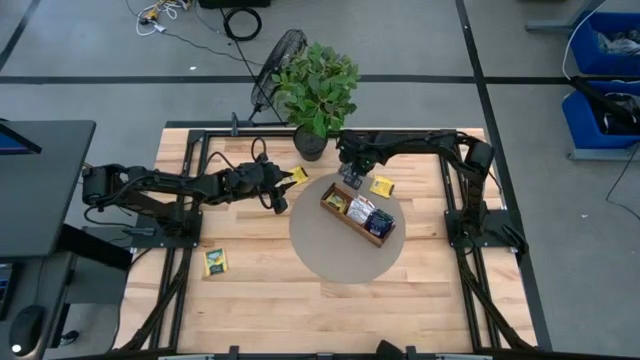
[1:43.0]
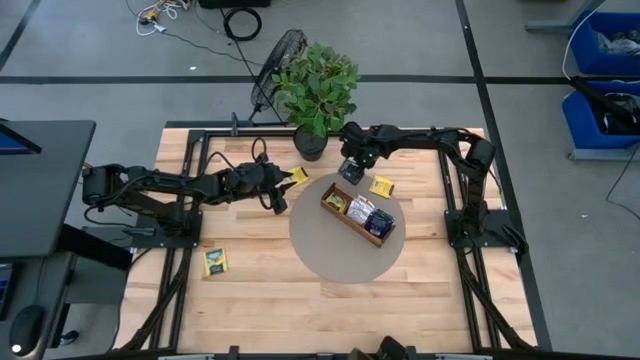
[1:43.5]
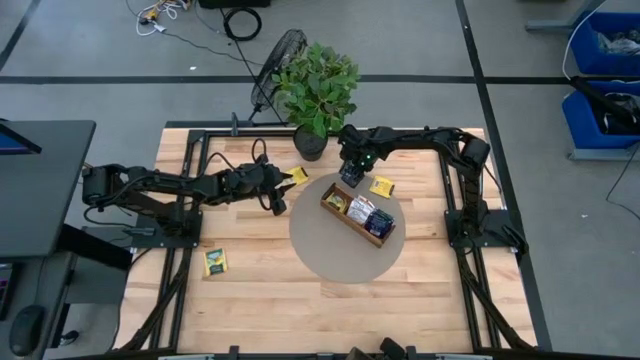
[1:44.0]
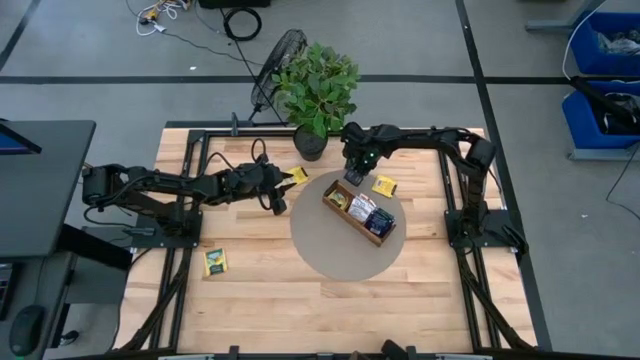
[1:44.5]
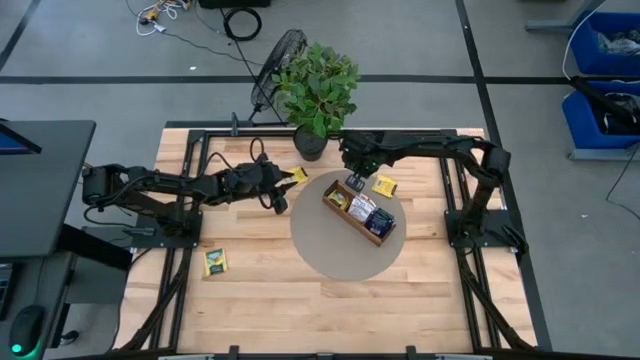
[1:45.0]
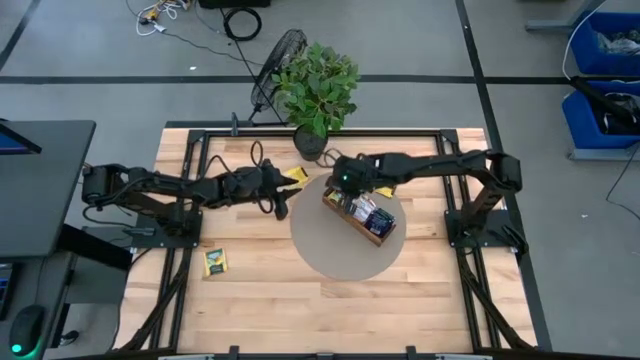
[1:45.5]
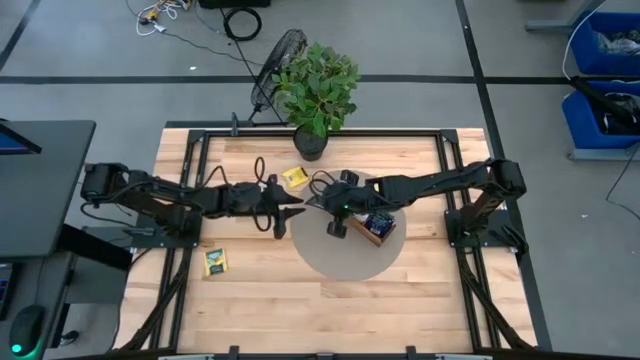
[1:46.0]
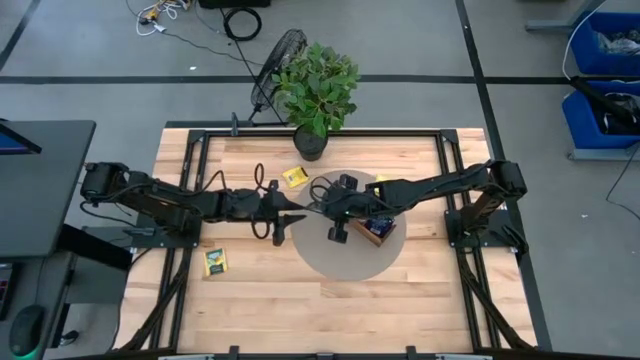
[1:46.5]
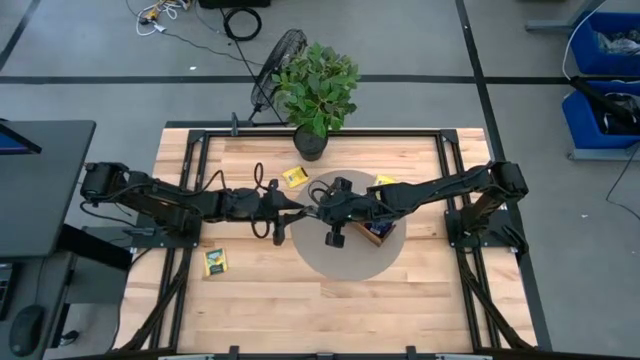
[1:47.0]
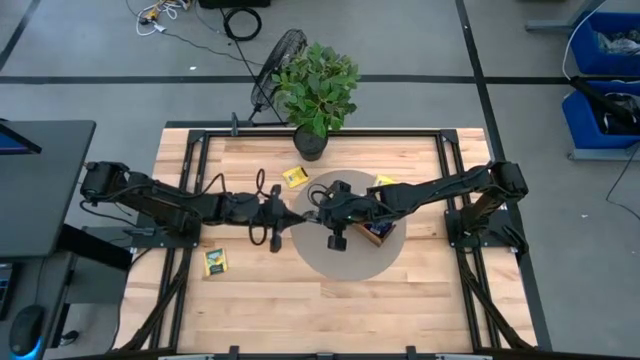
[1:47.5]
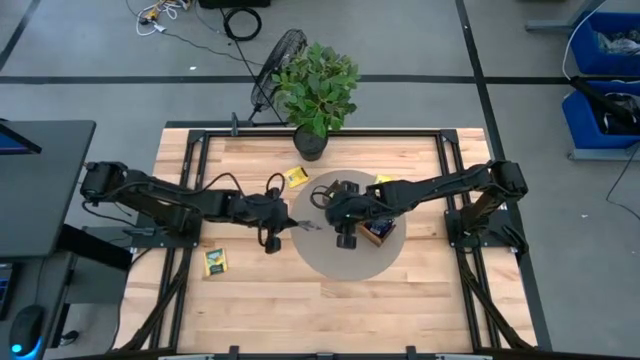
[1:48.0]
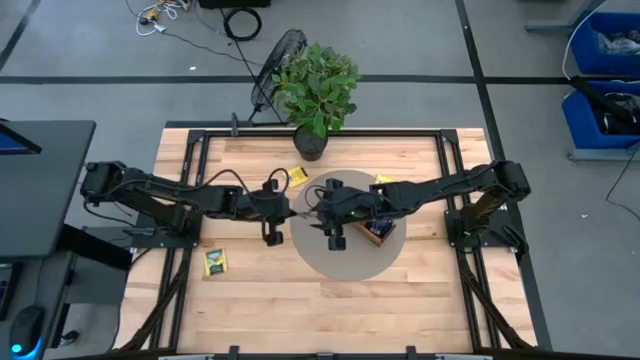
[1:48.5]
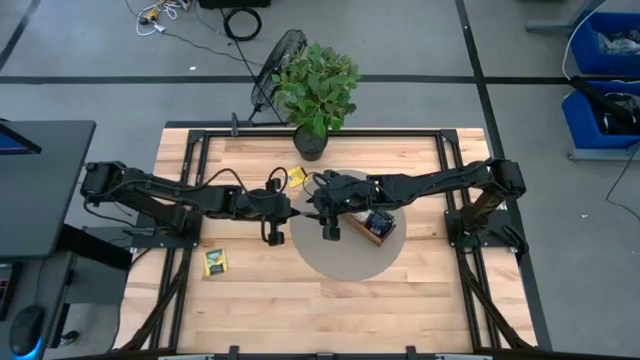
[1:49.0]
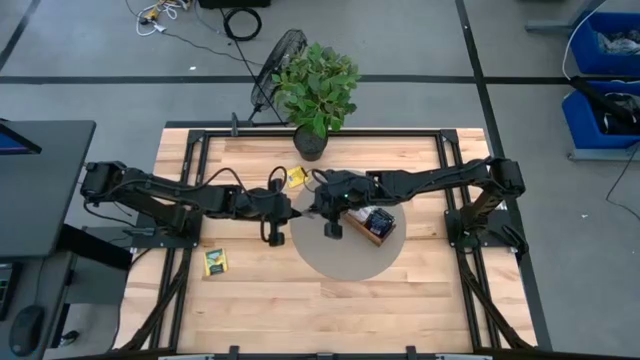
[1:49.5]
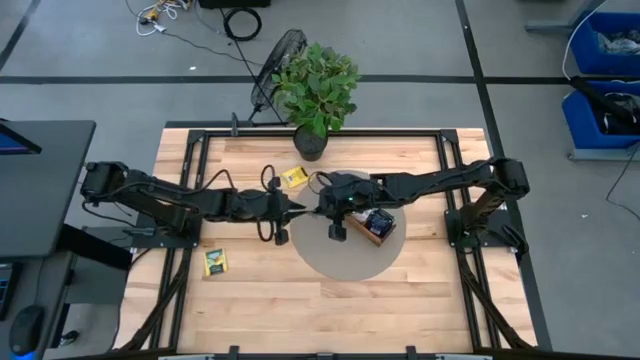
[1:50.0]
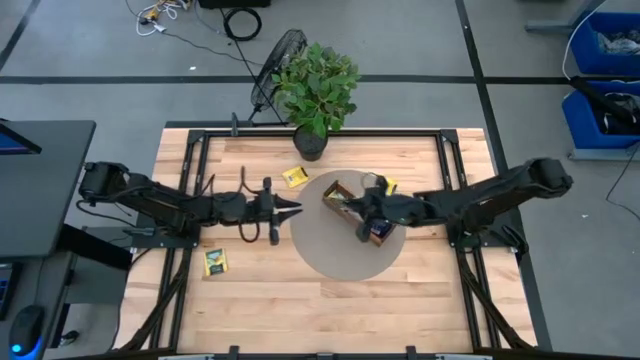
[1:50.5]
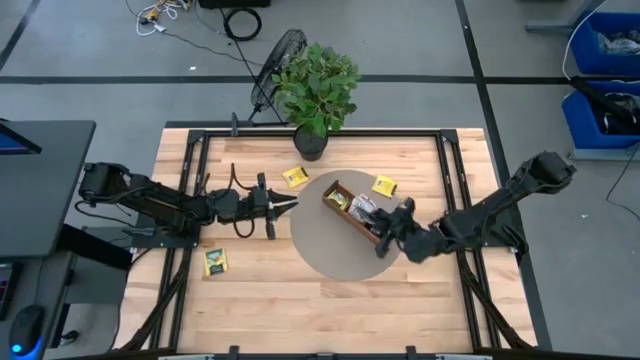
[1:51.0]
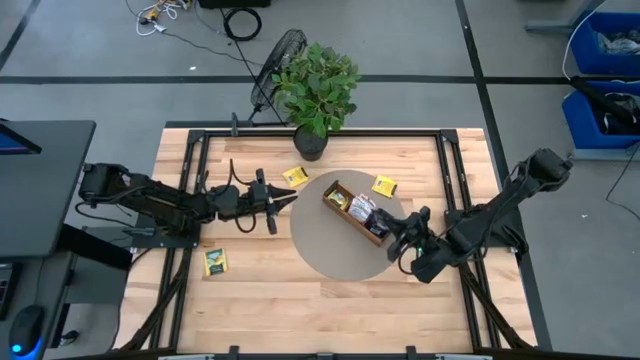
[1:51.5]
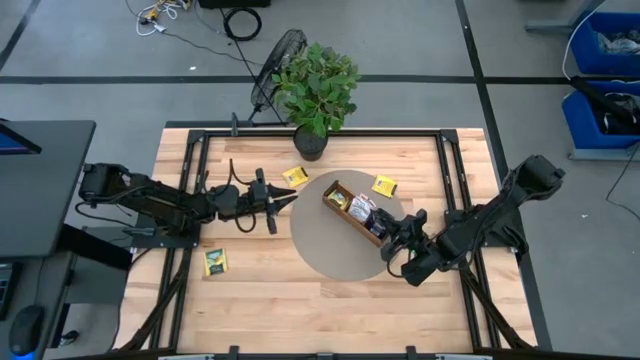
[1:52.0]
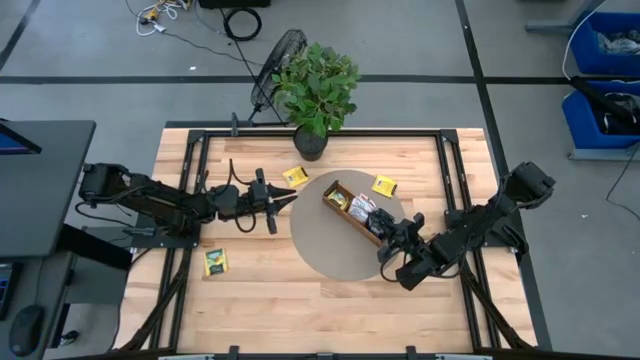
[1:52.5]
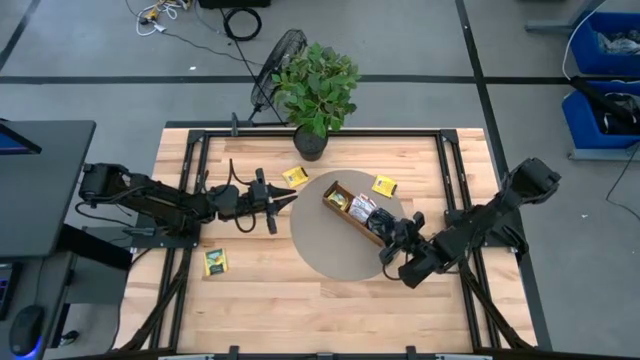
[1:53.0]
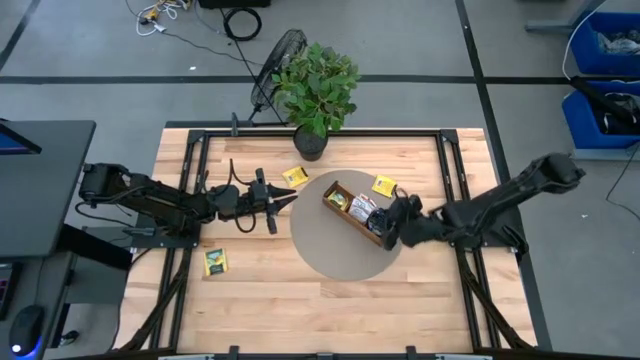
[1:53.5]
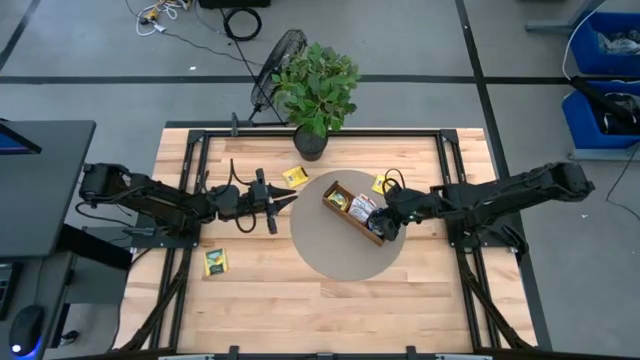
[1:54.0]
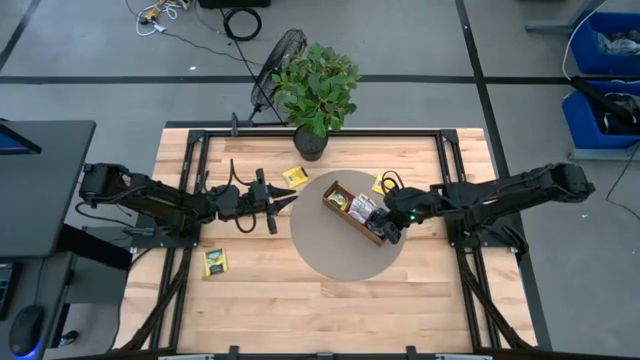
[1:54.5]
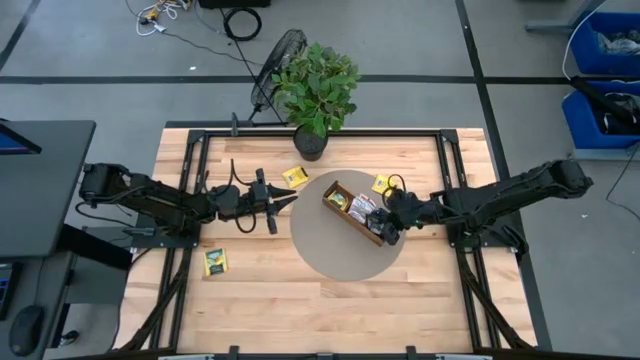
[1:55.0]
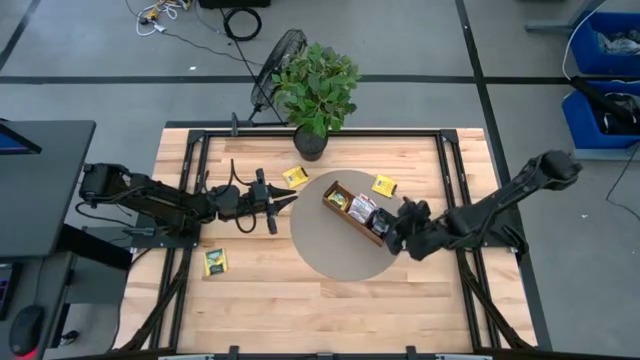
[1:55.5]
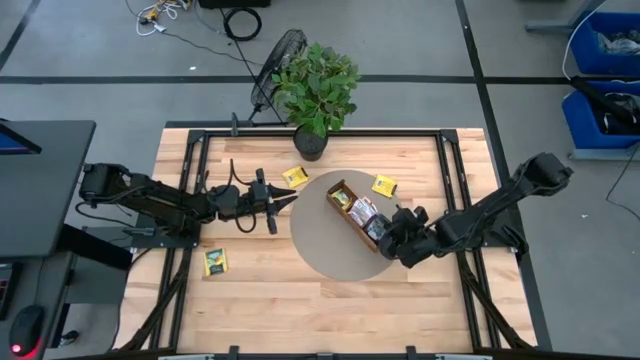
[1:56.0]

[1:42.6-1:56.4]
Task: Pick & Place Tea
Put the black tea bag into the right section of the wooden organizer

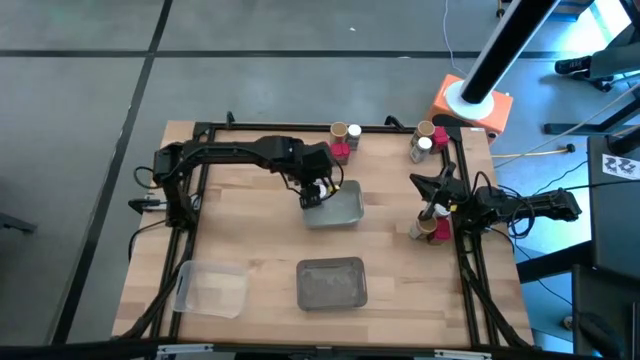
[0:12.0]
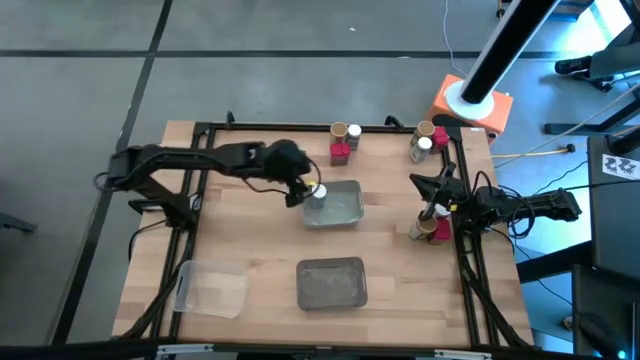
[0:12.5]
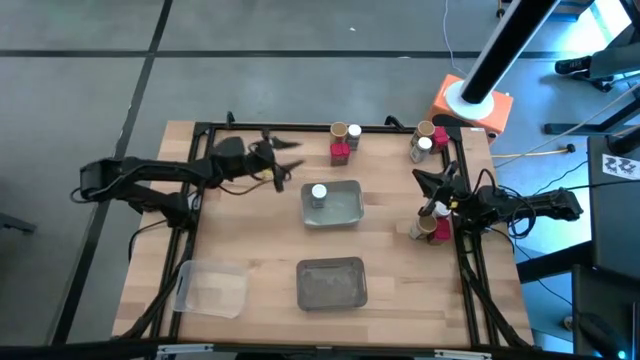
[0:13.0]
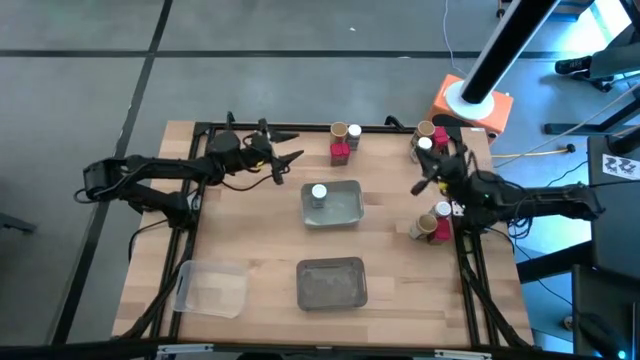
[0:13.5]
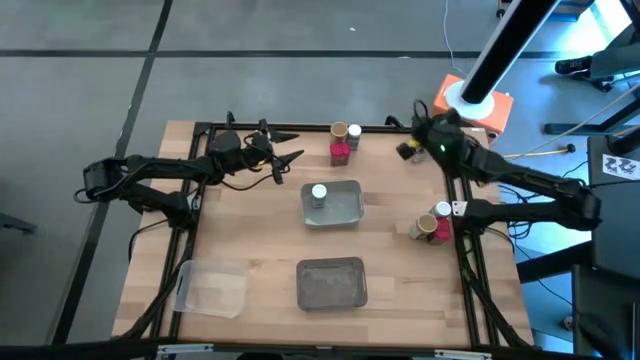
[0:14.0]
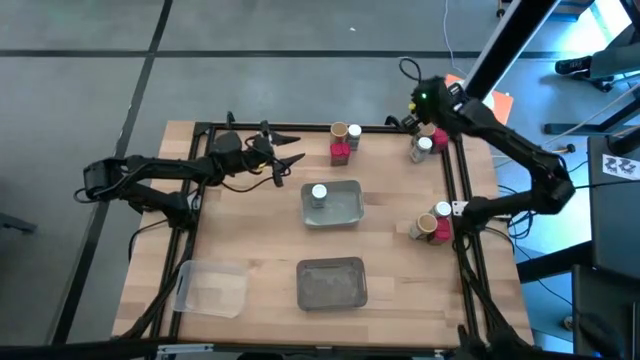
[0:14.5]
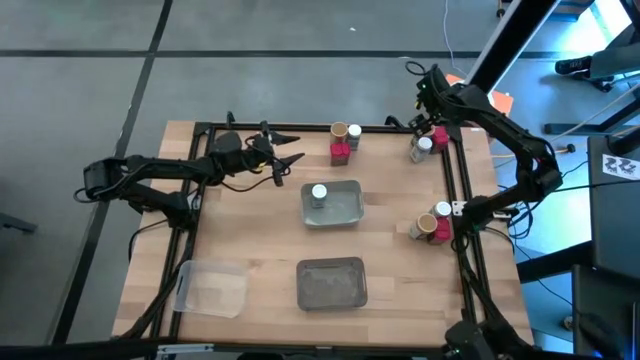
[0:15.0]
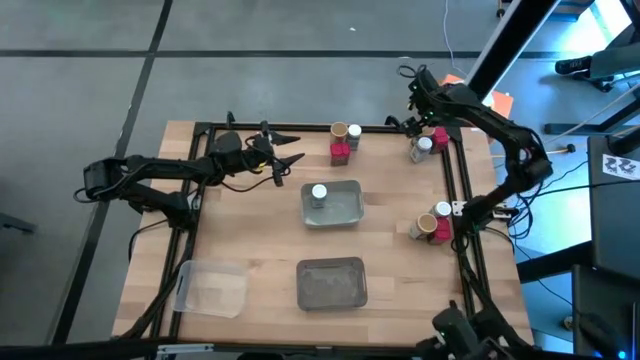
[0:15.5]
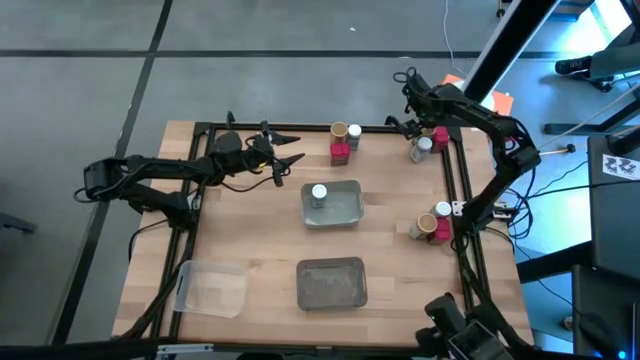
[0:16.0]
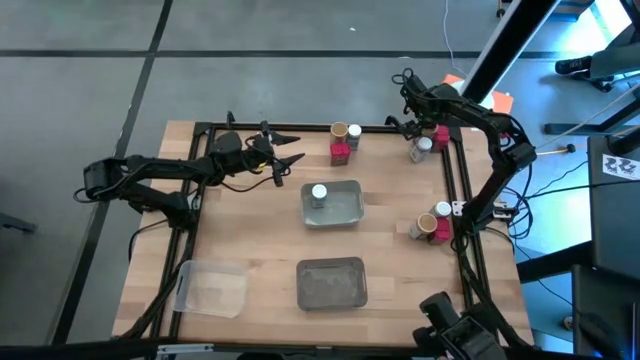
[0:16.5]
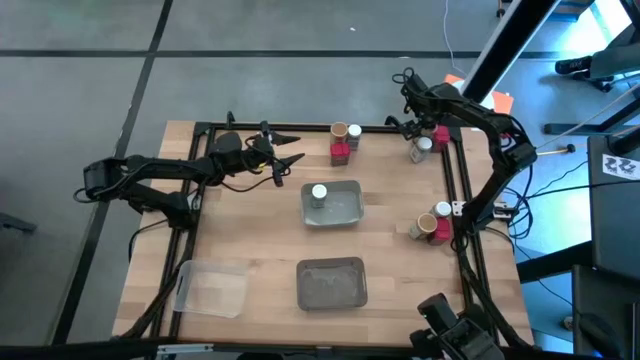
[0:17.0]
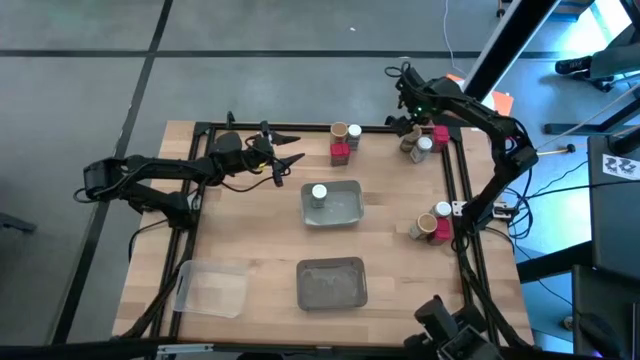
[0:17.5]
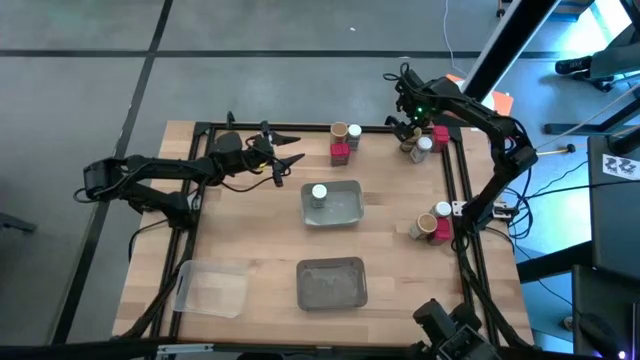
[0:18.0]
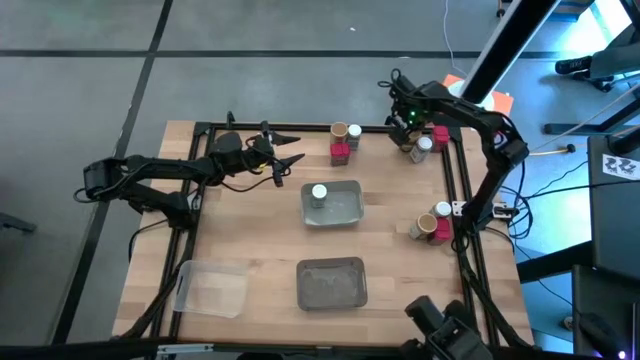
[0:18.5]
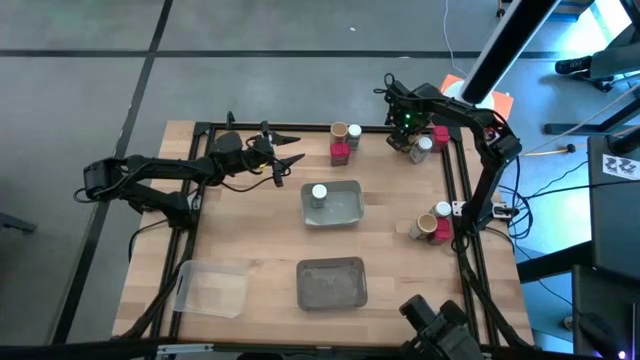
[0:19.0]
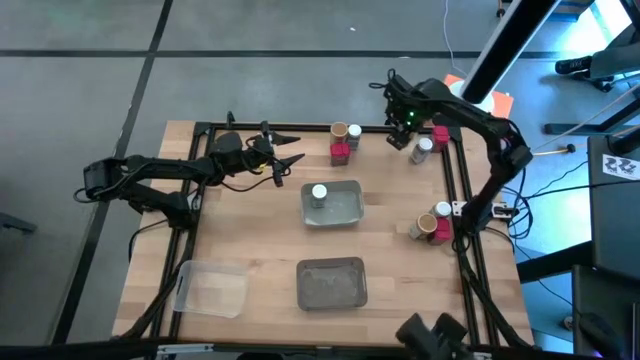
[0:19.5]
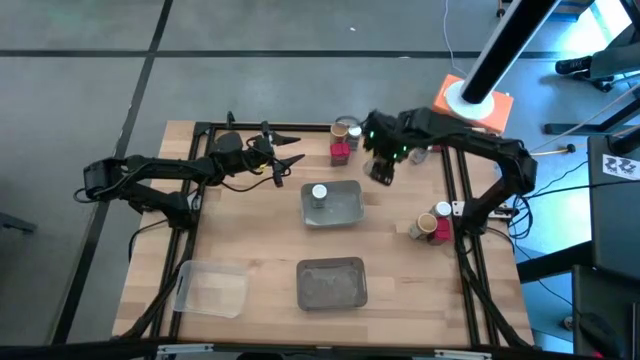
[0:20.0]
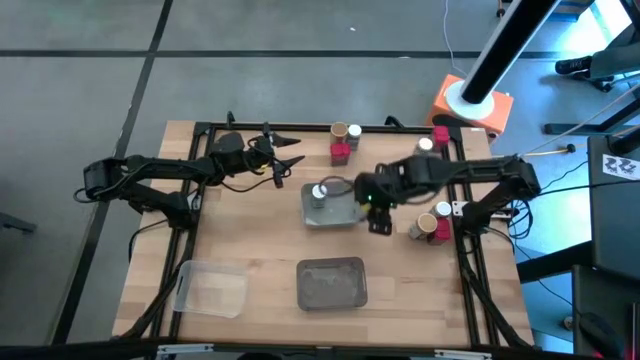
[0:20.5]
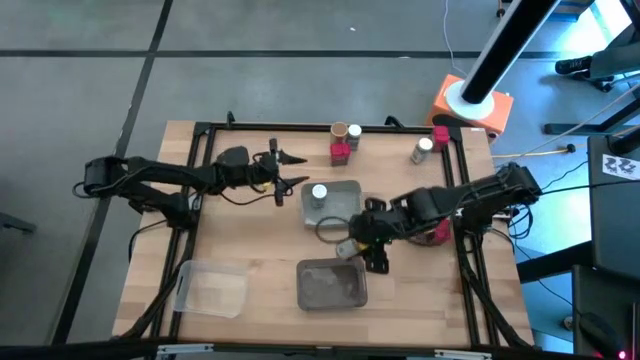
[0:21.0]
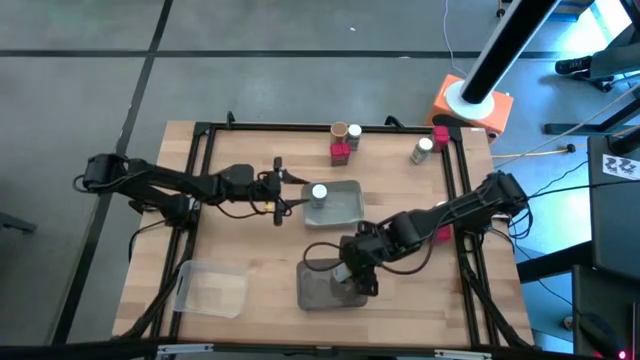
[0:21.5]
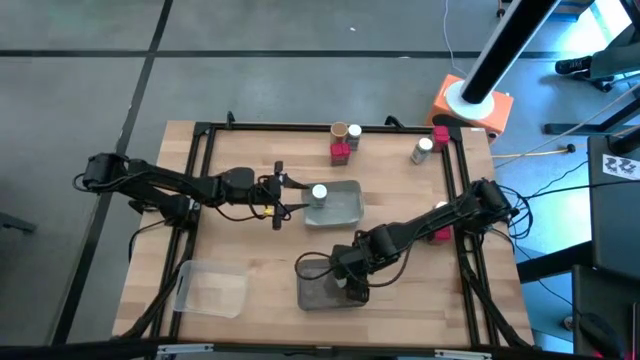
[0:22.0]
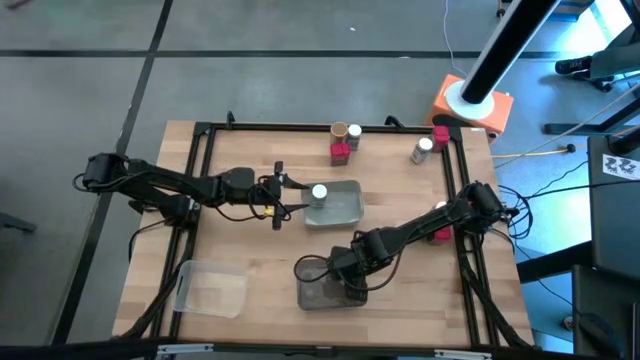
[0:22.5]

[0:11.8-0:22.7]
Task: Sort spices by type
Put the top right golden seasoning bottle into the black bin
